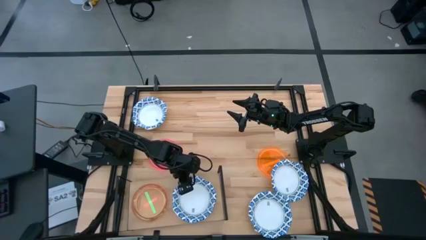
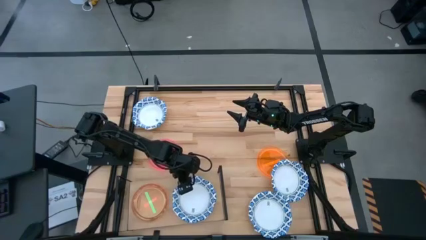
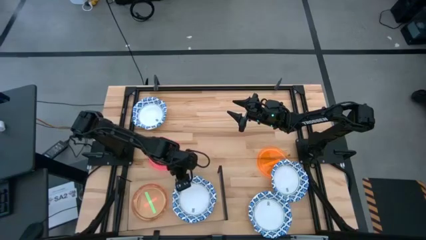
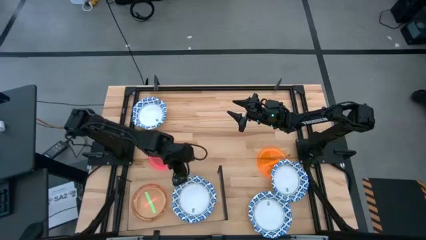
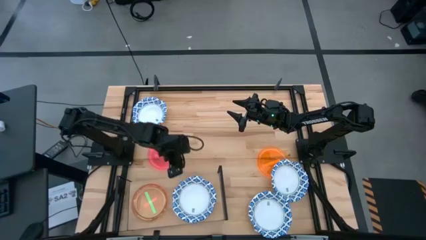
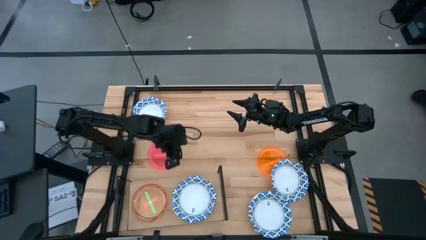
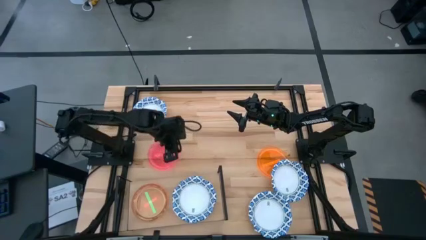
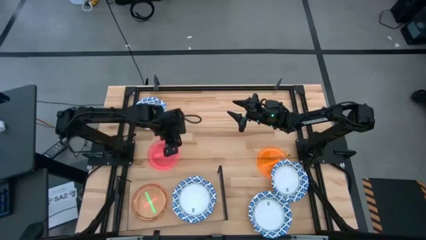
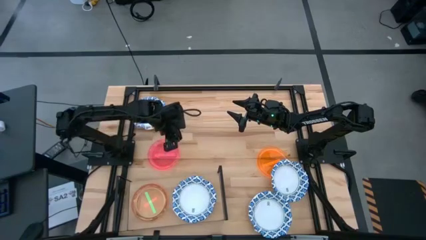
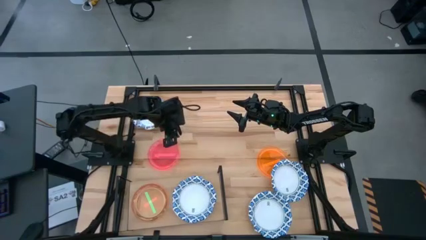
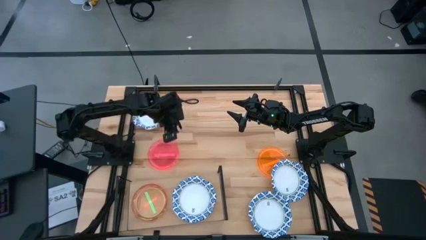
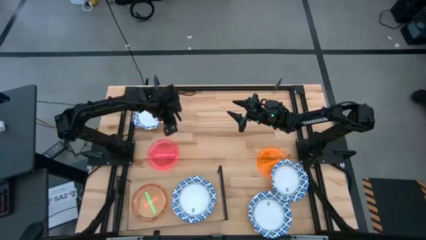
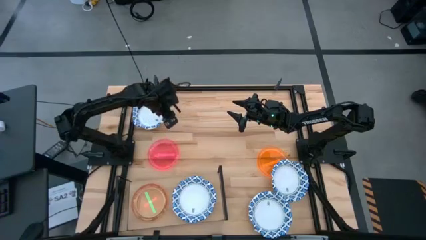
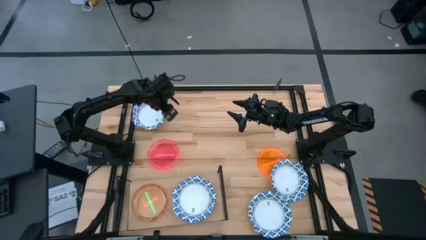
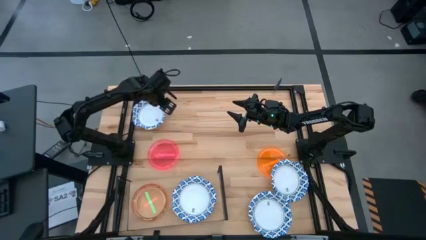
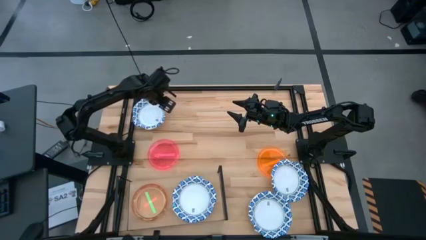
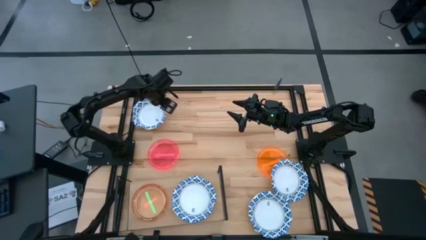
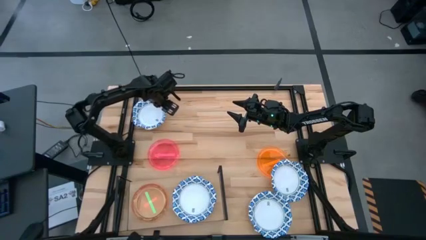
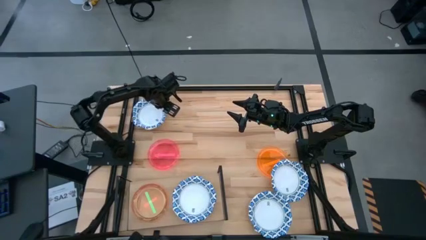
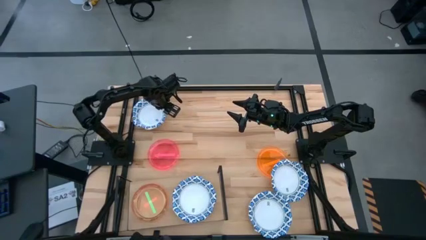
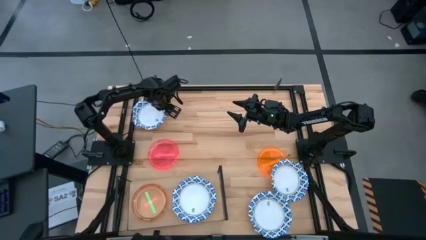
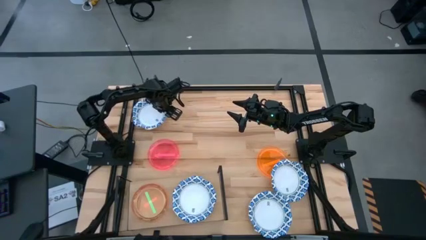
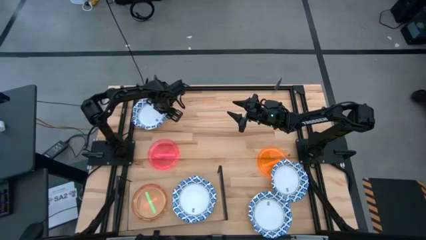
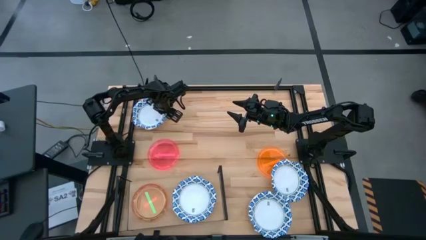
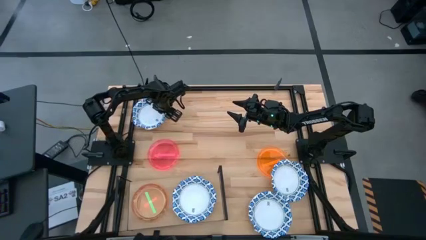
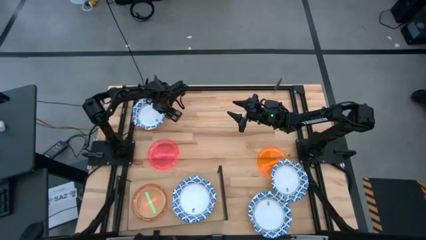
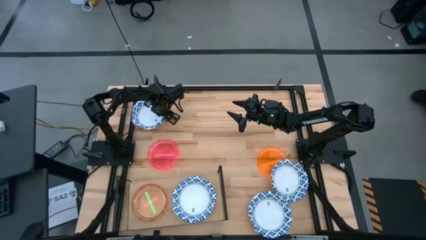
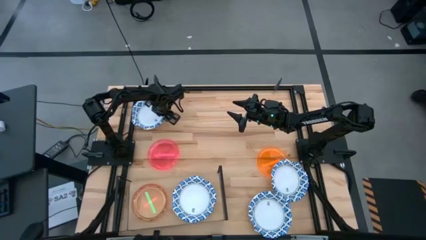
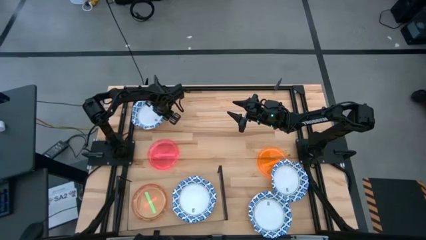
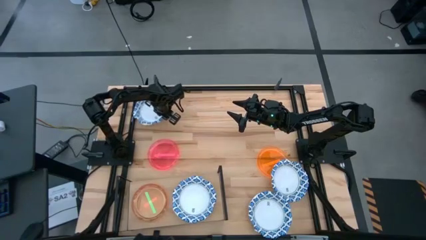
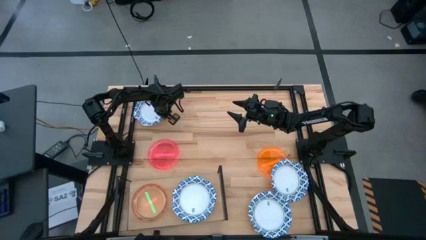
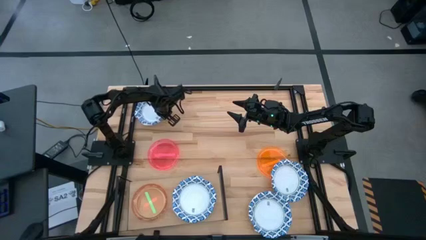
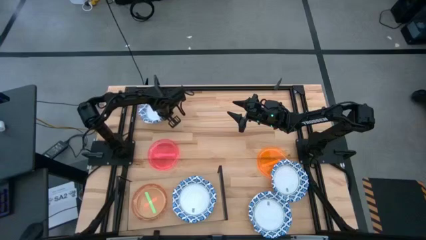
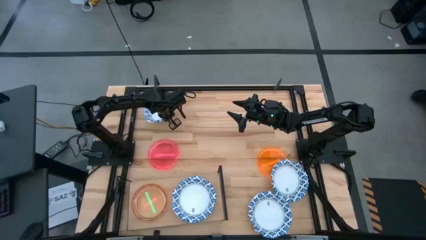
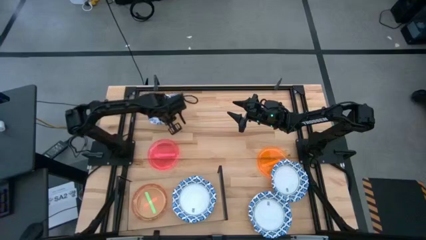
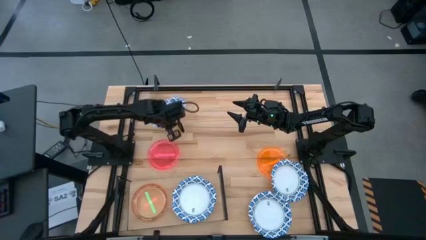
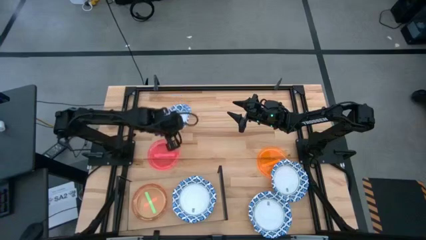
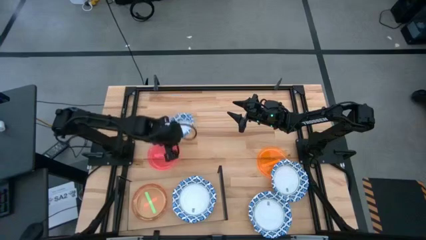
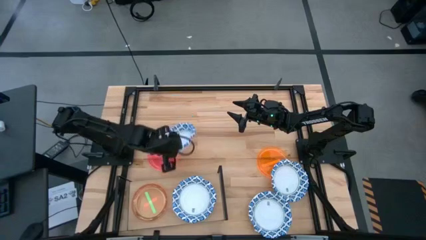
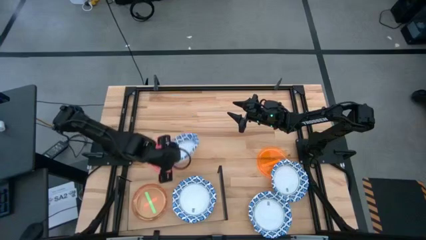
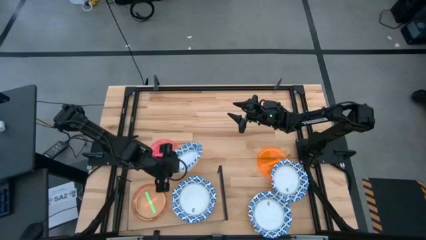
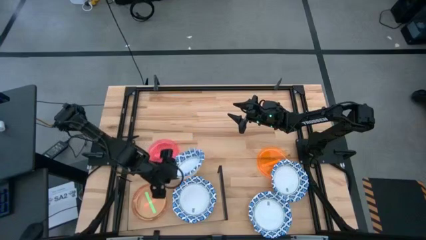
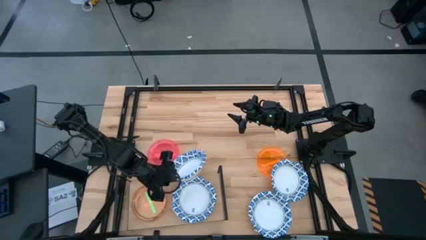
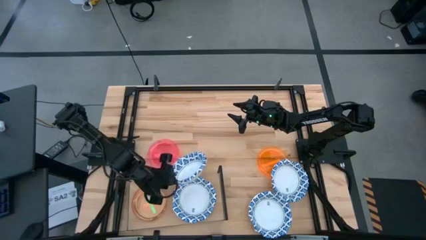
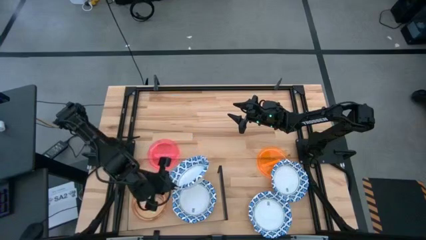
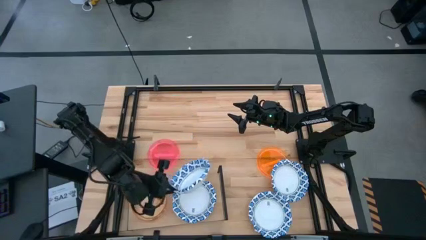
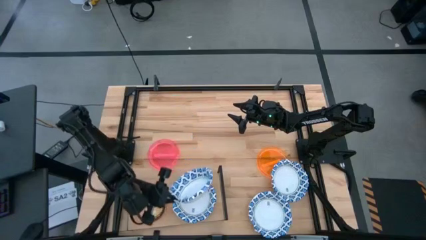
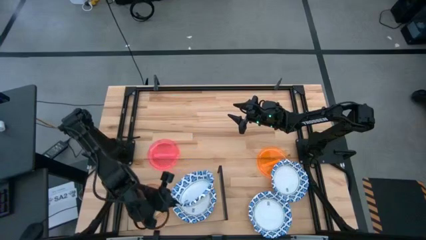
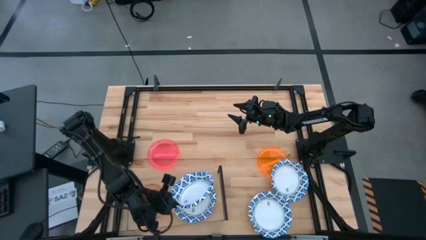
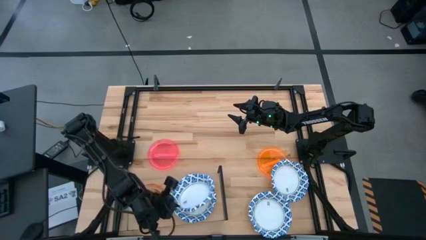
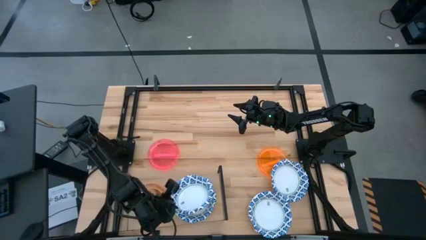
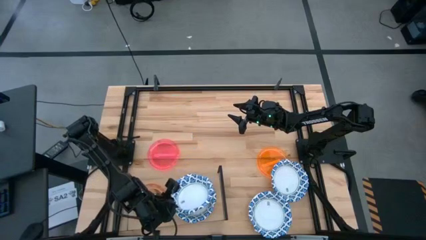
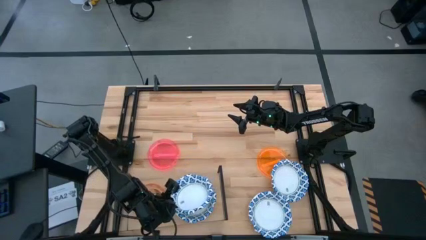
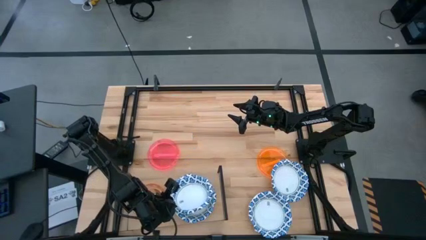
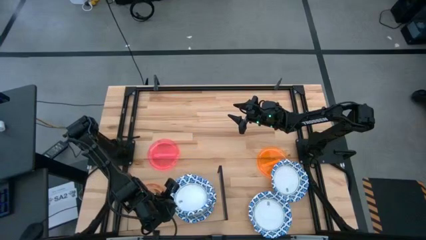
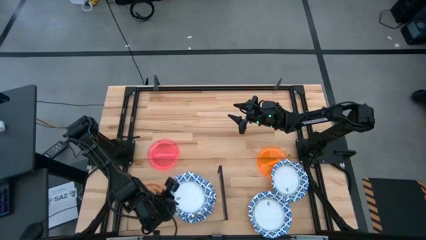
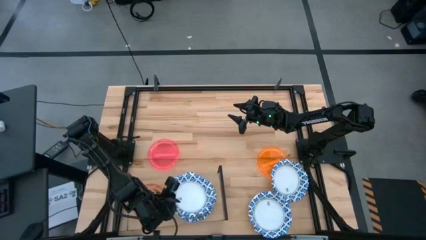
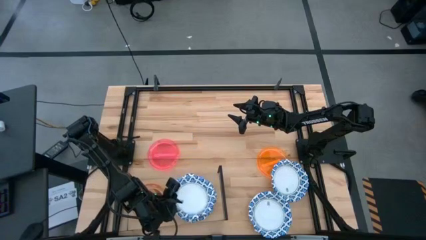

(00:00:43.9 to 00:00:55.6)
Task: Place and stack plates onto a shelf
Stack the top left blue bowl on top of the other blue bowl on the shelf

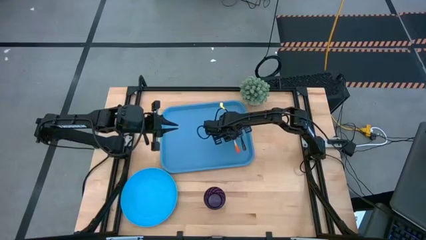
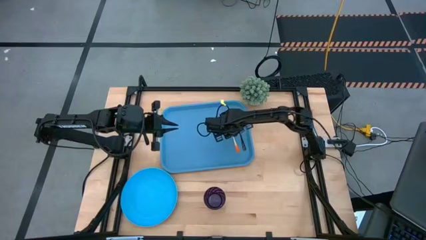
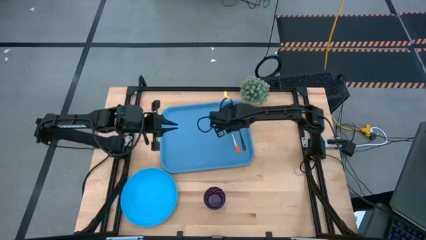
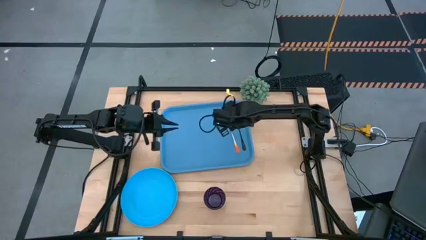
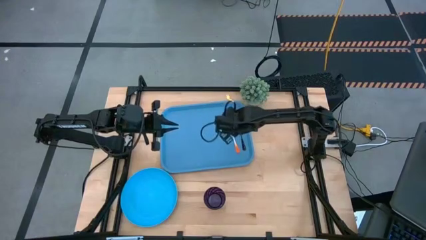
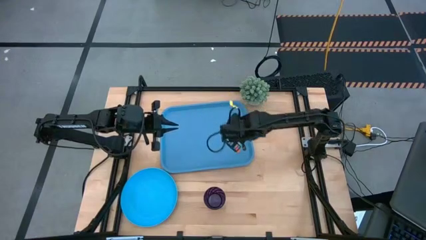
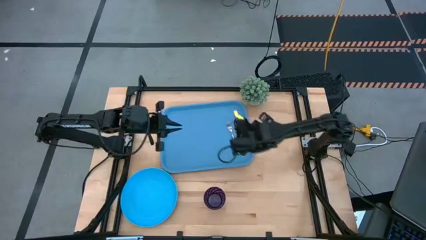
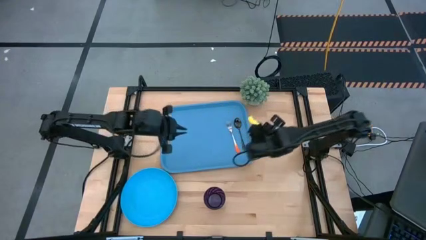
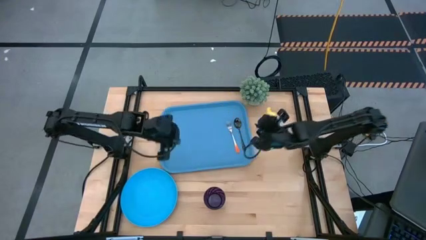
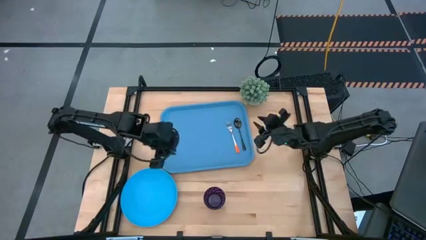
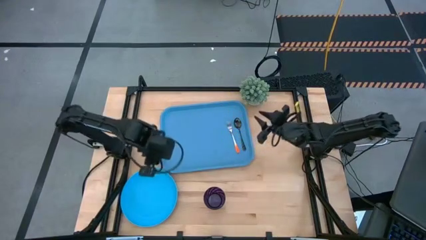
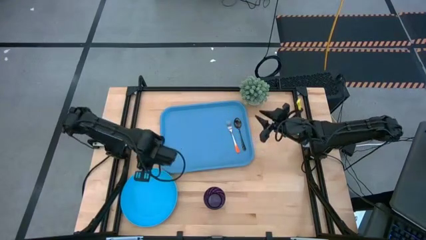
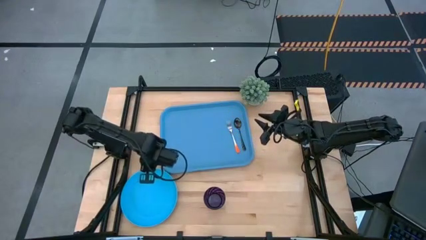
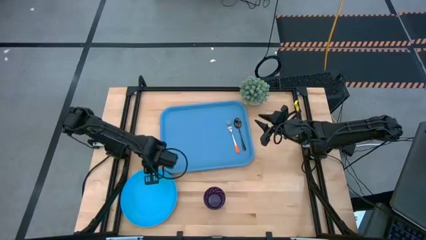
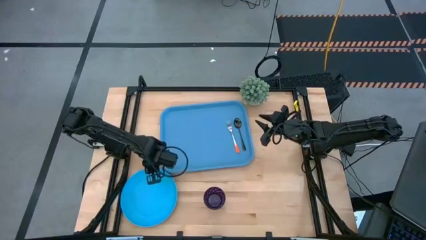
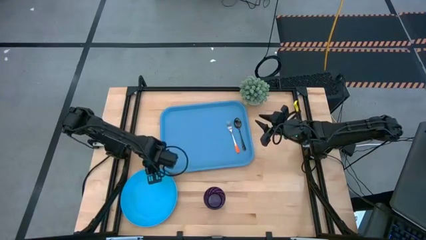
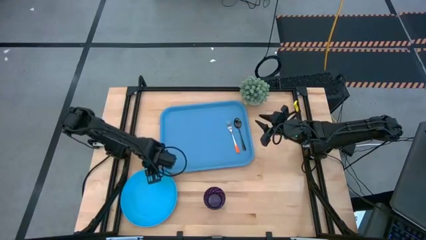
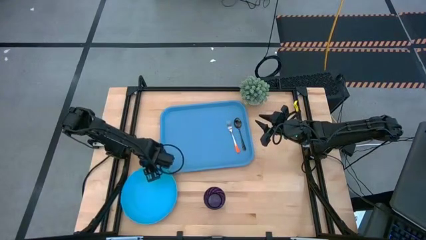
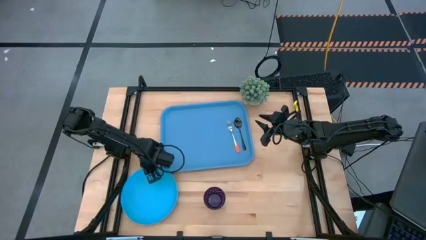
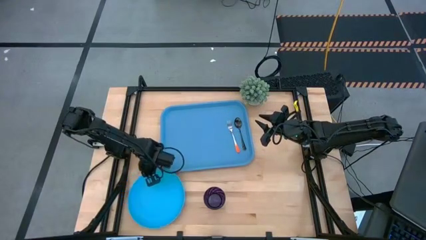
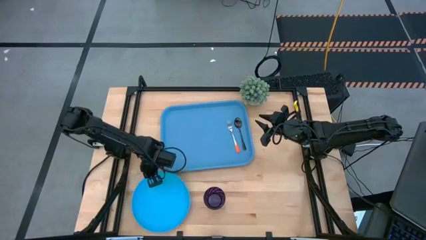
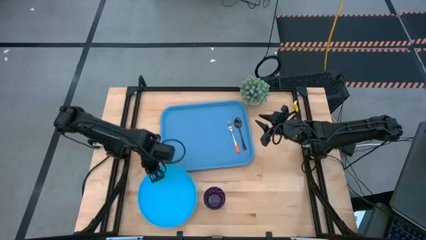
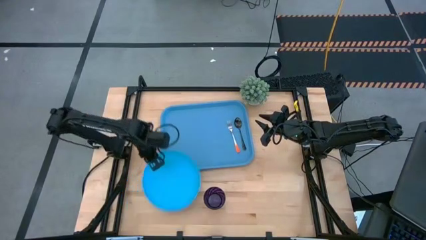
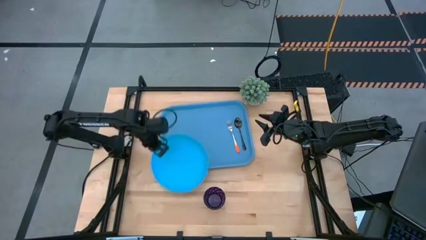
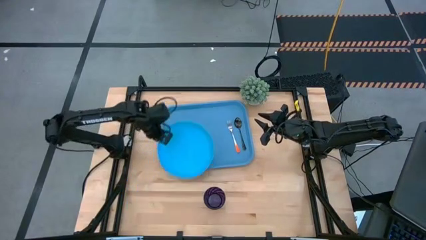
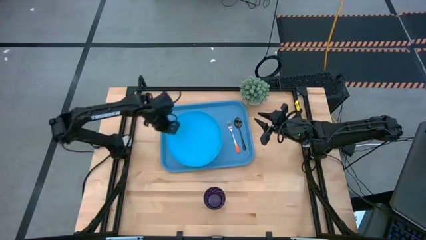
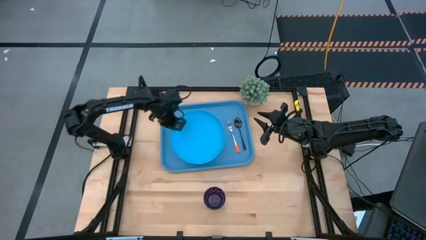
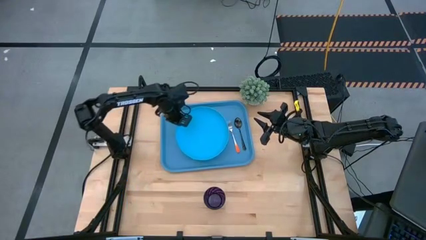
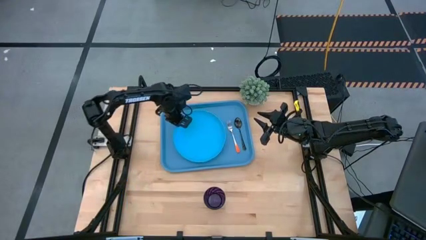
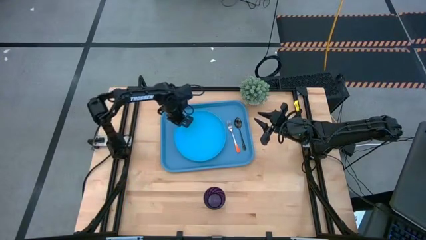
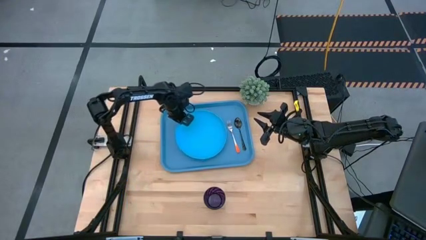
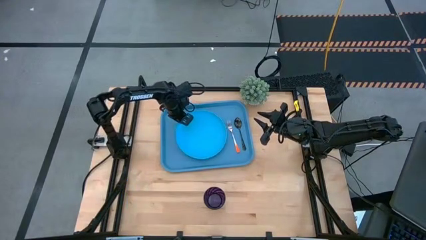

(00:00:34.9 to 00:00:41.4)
Task: Pick and place plate/cup/fork/spoon on tray
Put the blue plate on the blue tray
